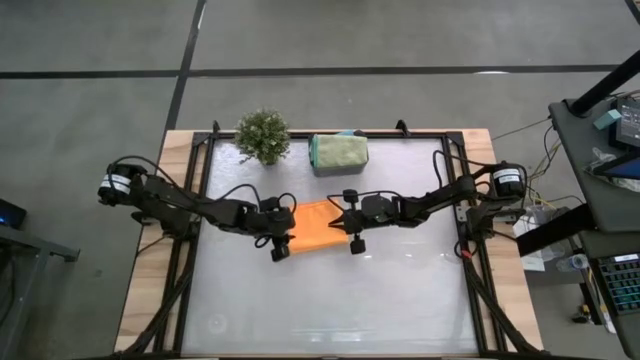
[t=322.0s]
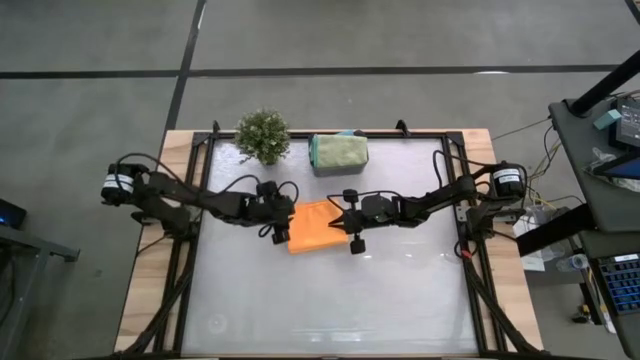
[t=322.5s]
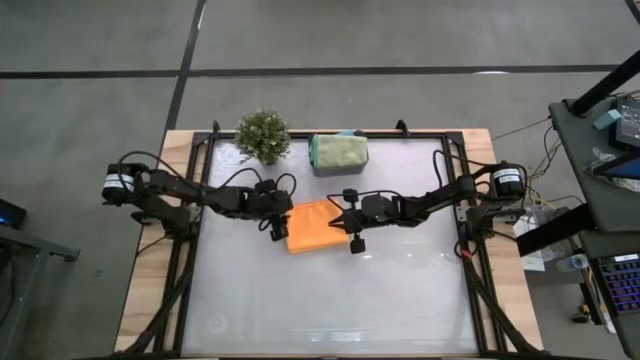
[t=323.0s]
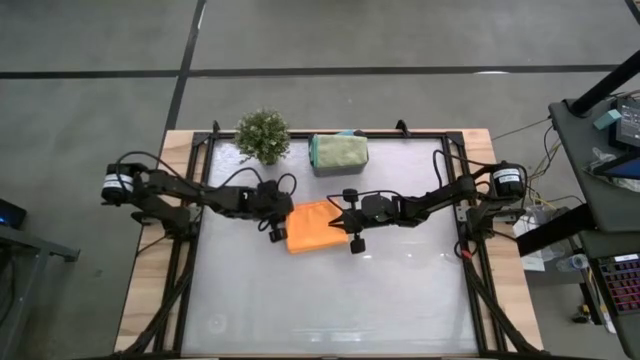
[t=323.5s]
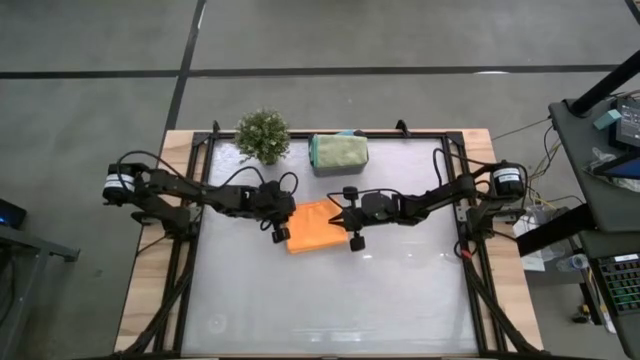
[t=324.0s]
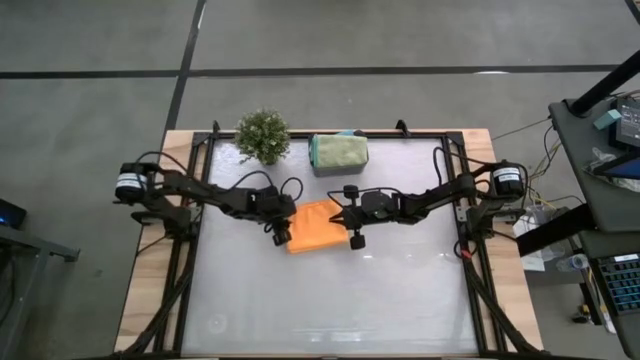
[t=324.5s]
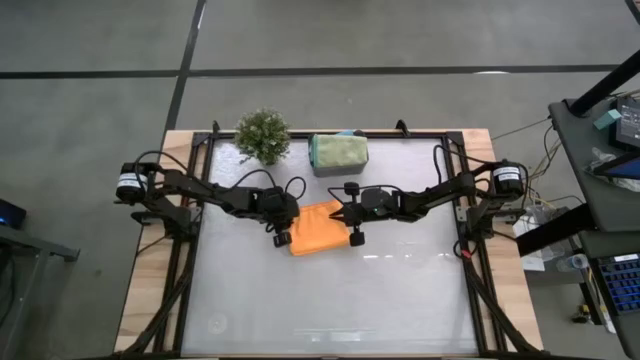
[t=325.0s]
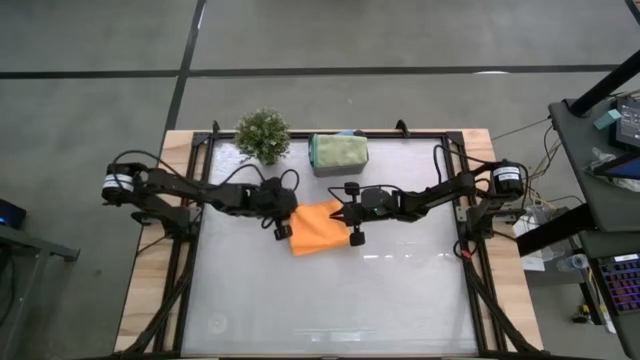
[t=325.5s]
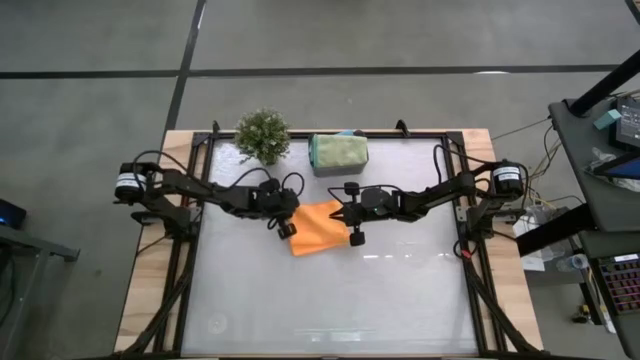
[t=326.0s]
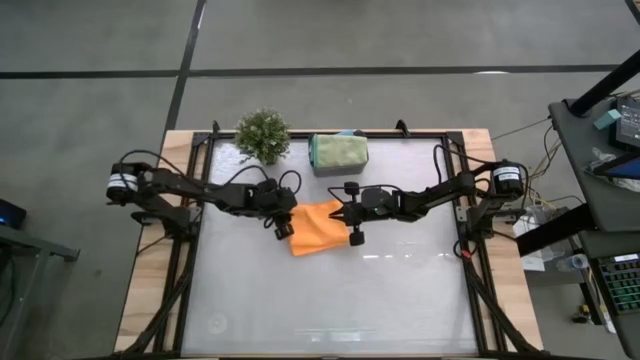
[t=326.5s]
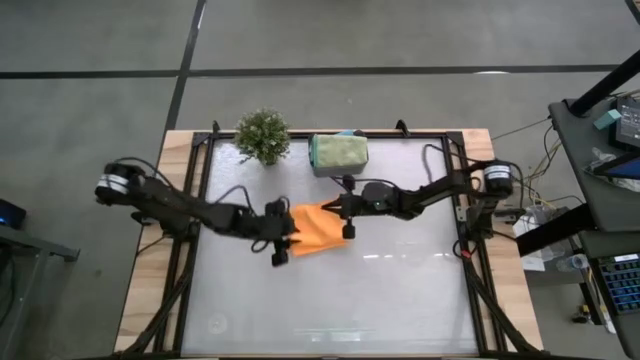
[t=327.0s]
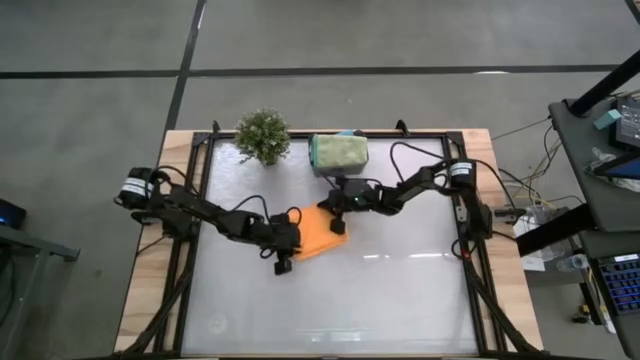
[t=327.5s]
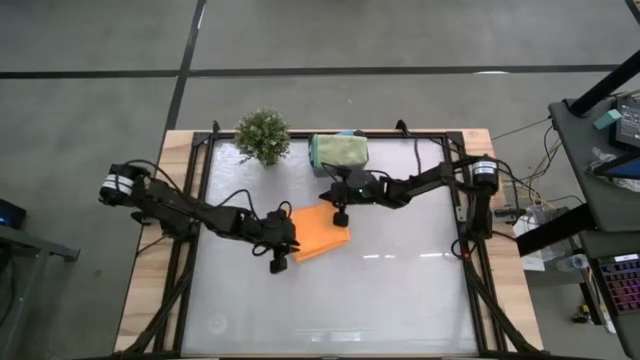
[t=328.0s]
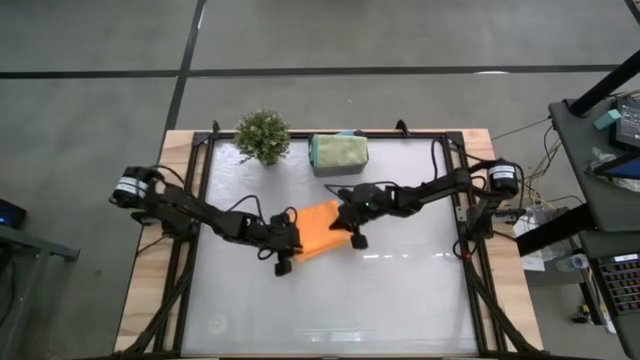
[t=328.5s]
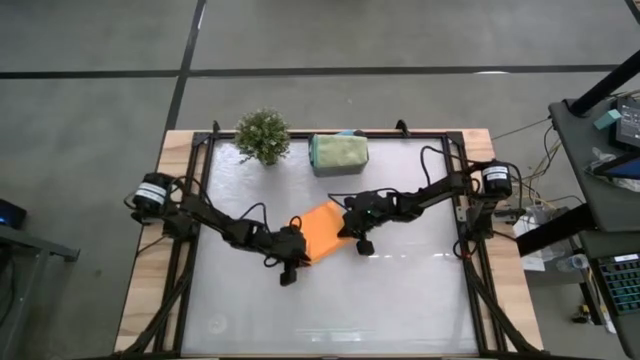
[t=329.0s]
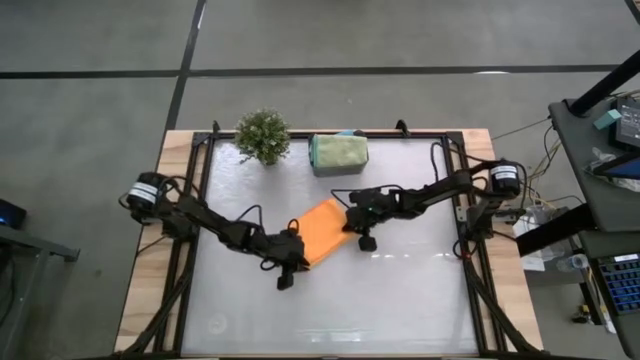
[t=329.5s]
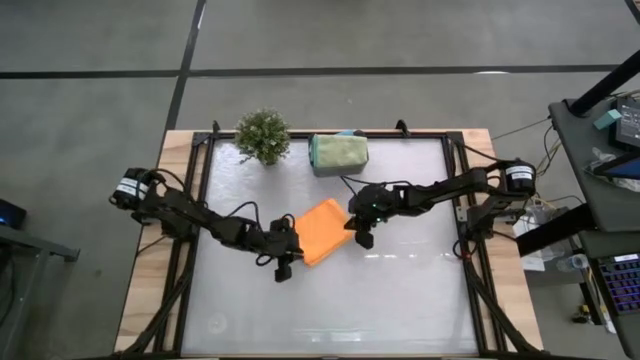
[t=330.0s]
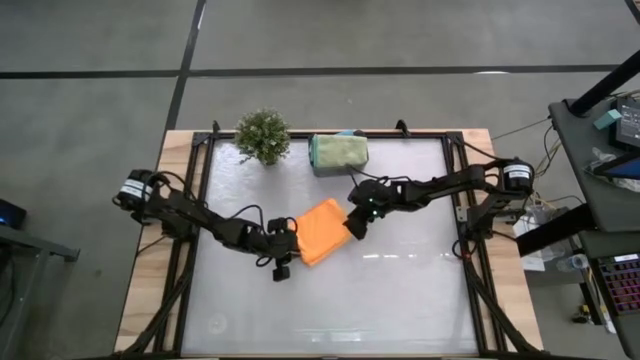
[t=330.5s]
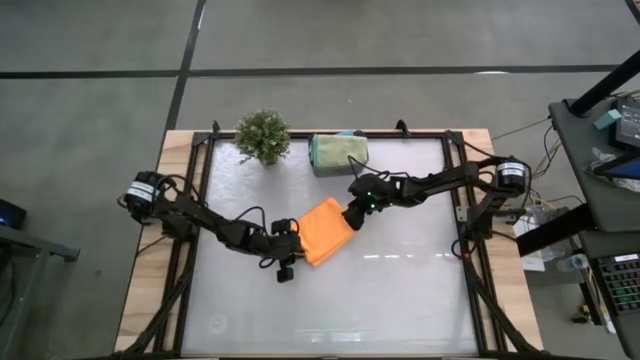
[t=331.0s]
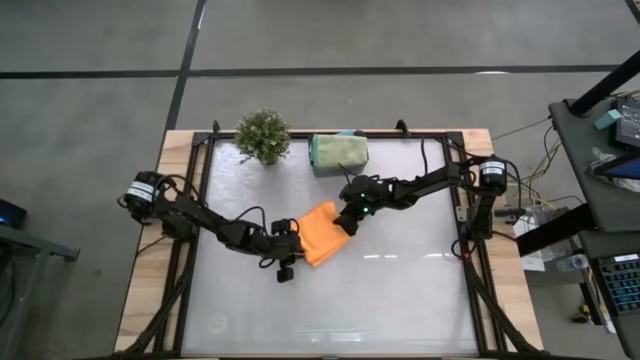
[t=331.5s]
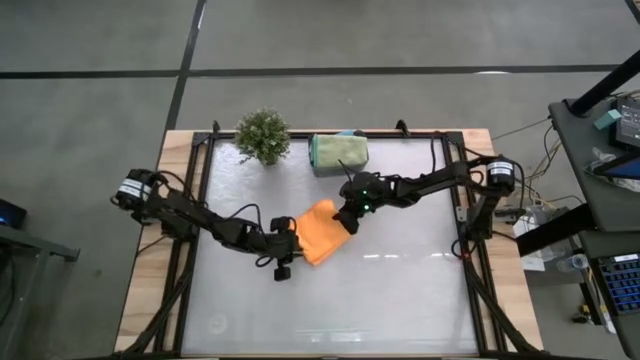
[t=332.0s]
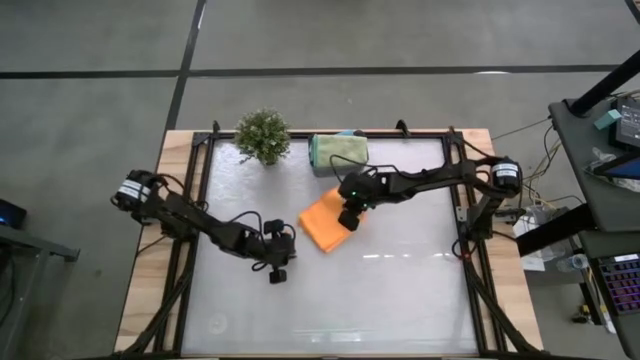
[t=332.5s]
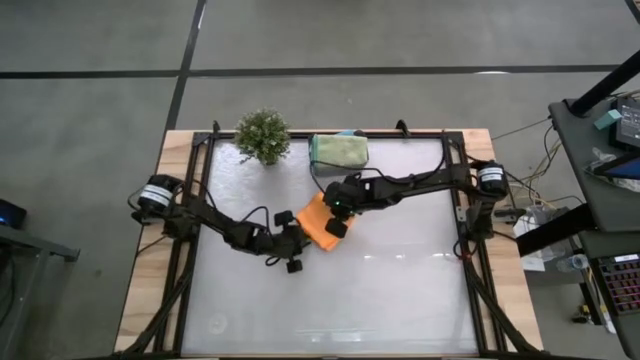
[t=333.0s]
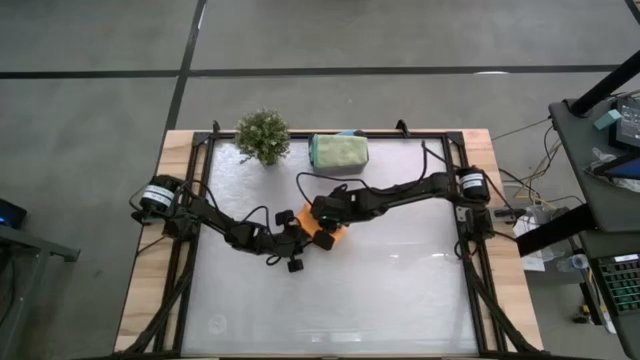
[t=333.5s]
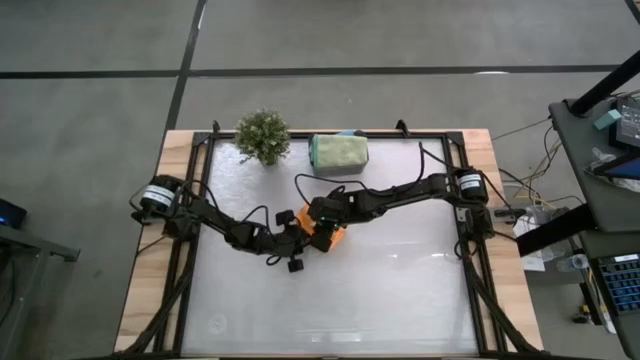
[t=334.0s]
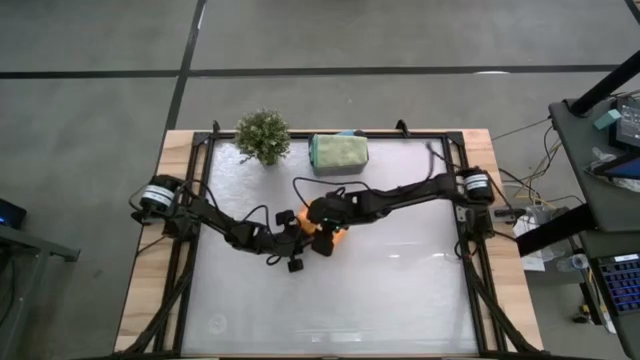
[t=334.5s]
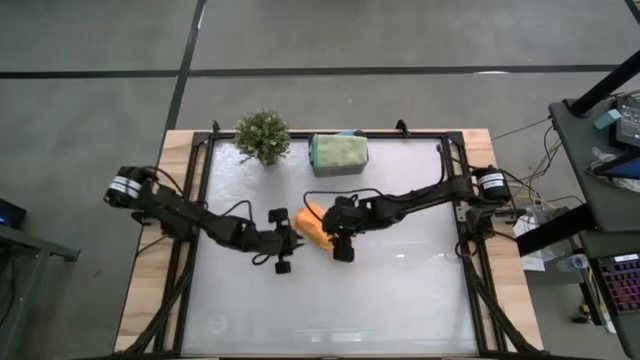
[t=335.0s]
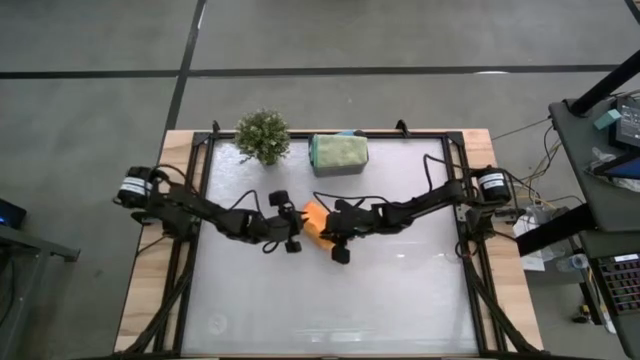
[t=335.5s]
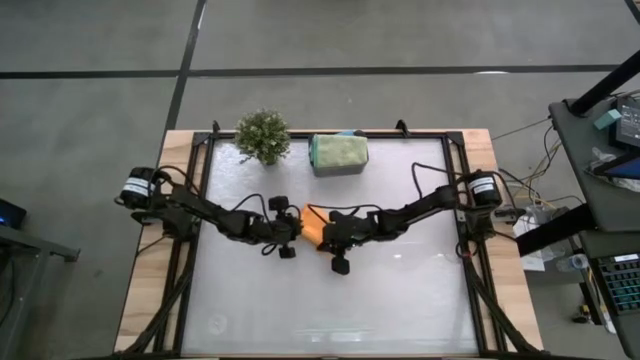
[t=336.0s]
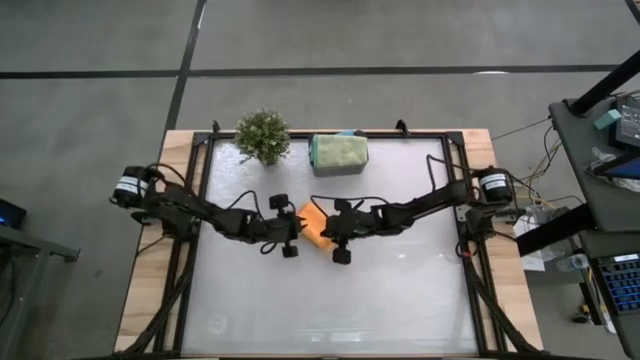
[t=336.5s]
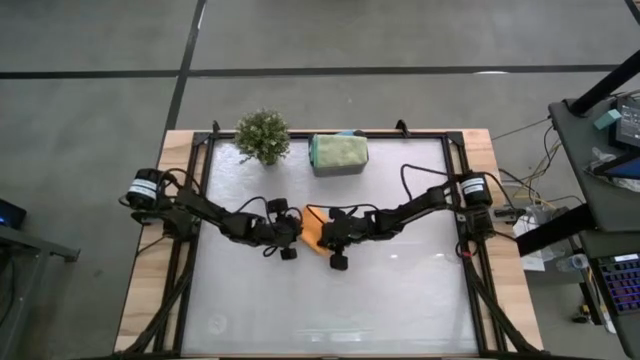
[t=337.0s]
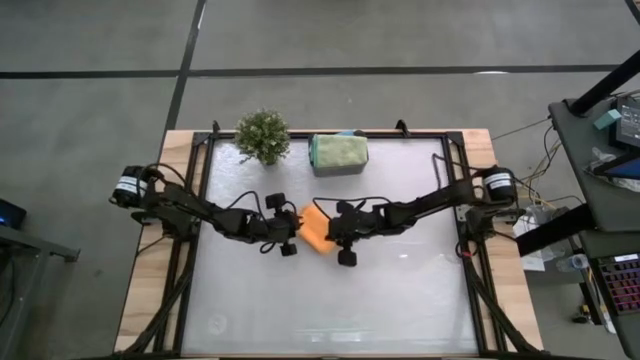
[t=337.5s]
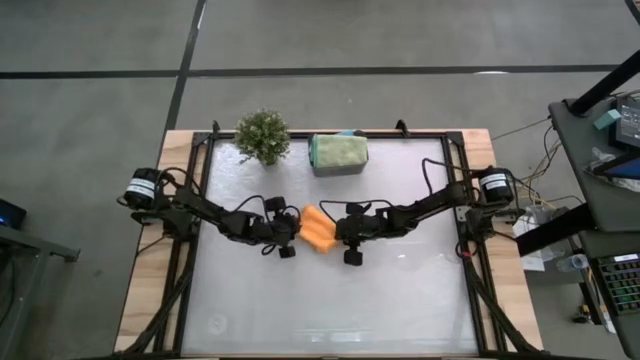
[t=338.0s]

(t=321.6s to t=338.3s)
Task: Fold microfiber towels
Fold the orange towel

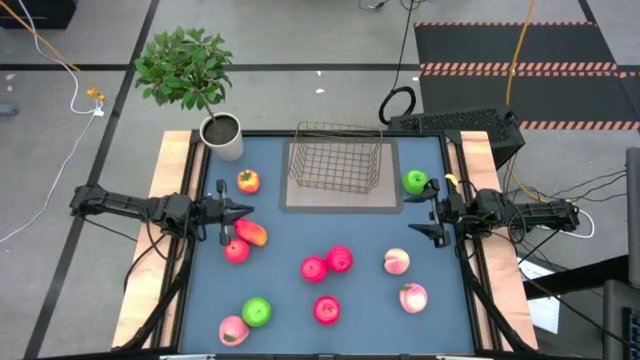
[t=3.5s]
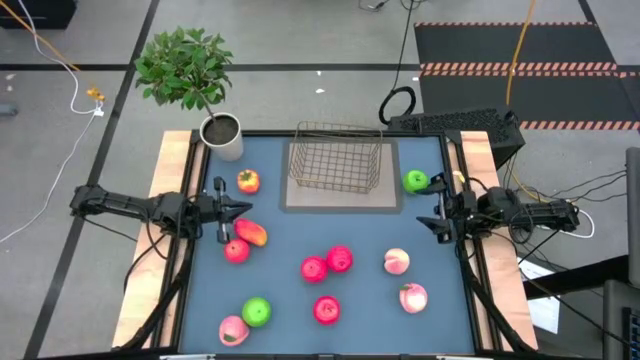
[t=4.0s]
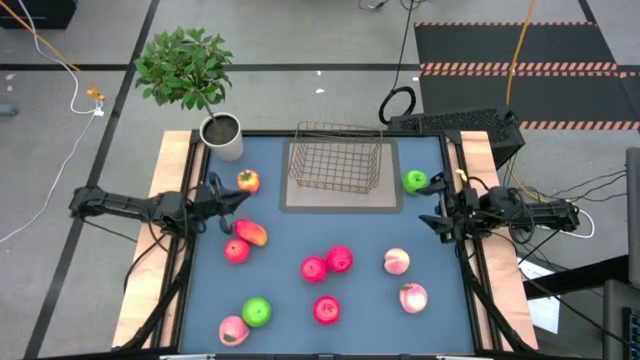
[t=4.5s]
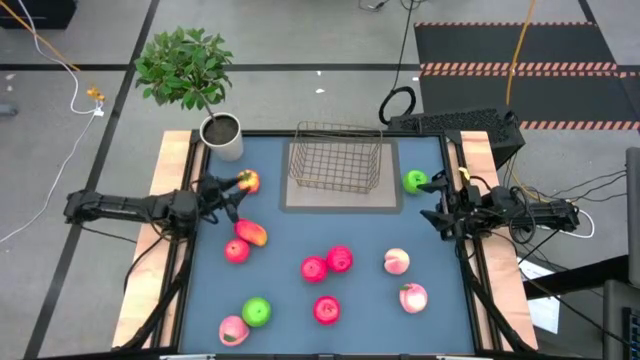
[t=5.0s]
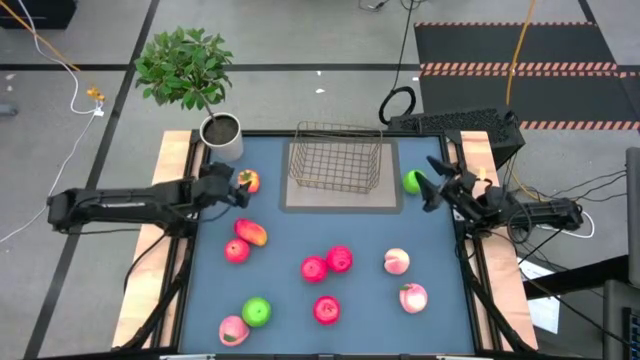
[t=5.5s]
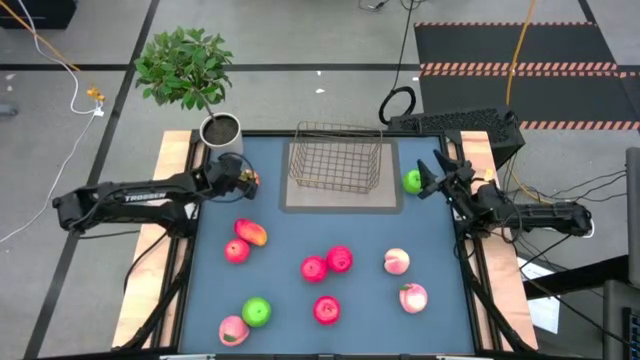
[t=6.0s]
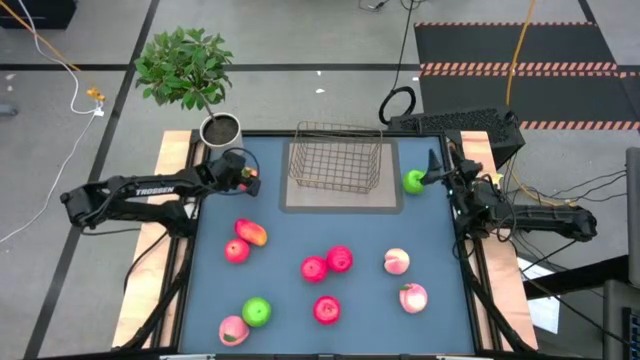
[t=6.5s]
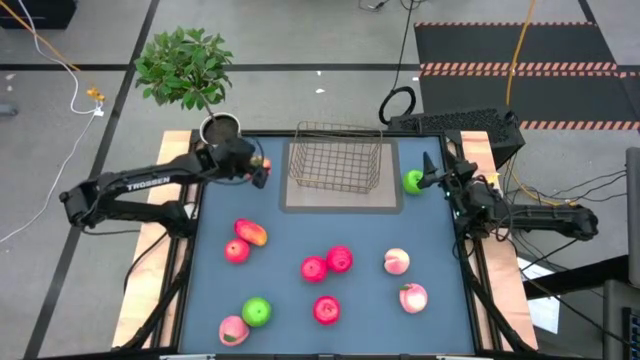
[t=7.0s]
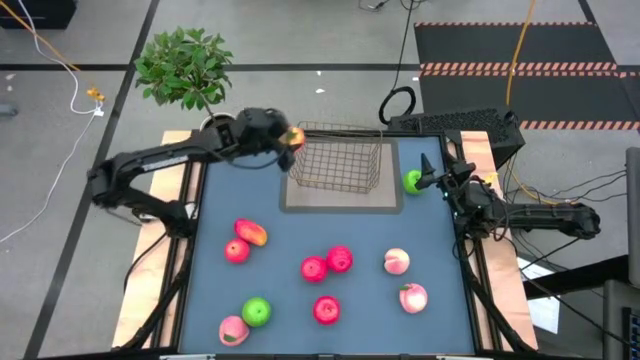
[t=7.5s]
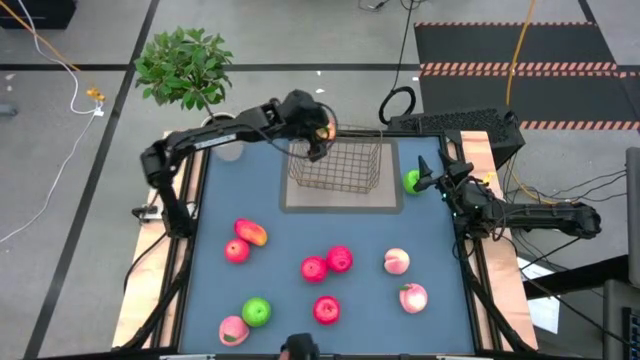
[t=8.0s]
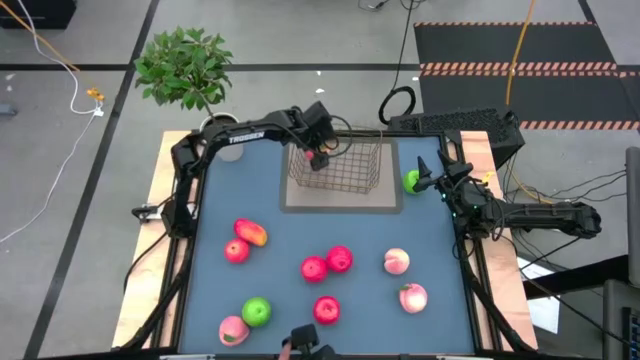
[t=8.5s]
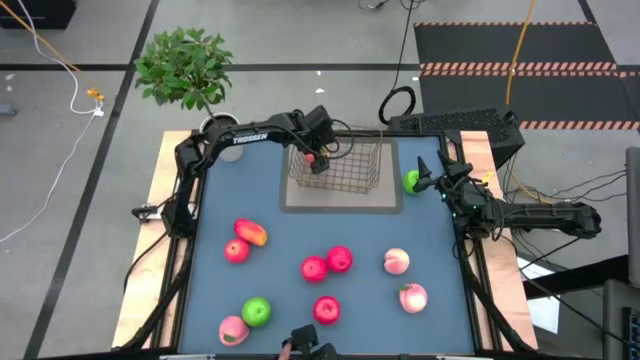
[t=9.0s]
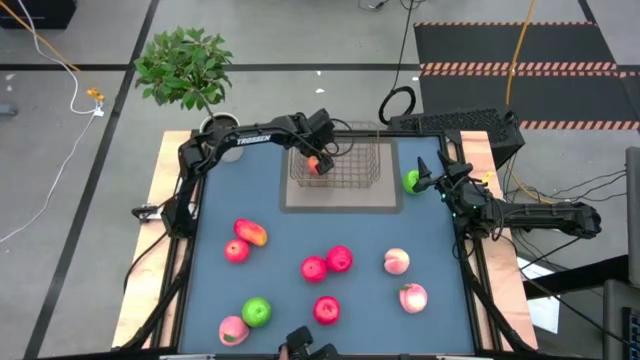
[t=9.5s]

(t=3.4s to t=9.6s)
Task: Build produce basket
Put the orange tomato into the wire basket
